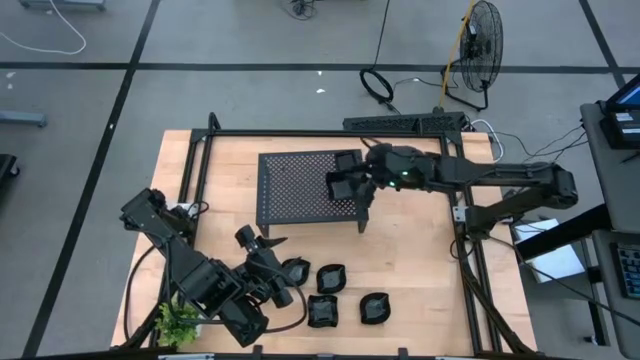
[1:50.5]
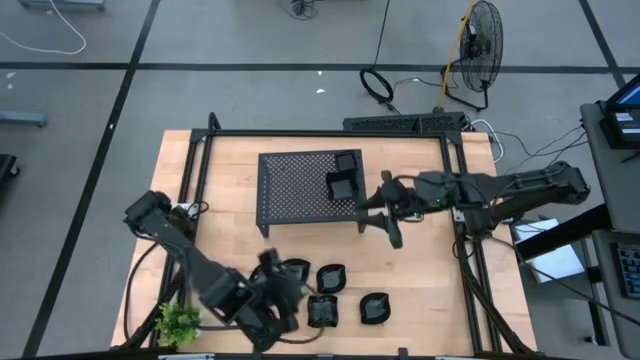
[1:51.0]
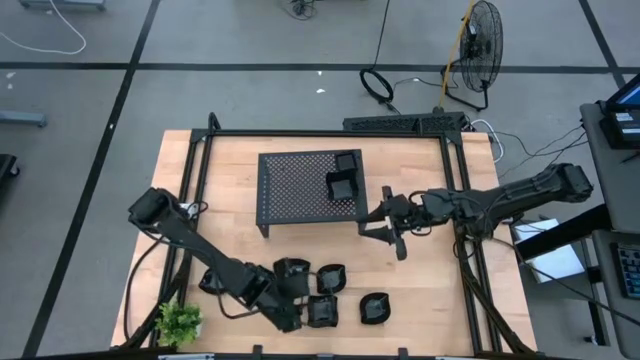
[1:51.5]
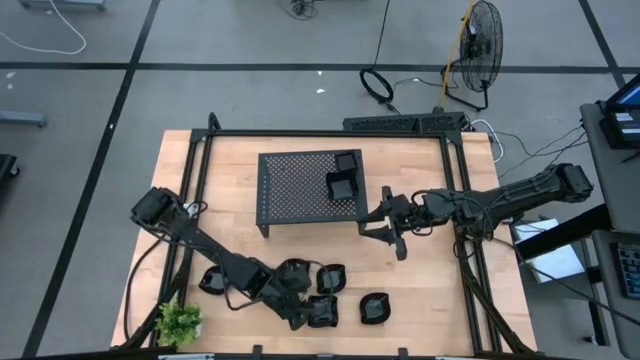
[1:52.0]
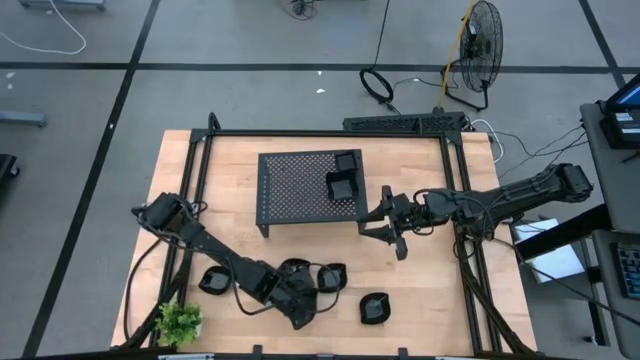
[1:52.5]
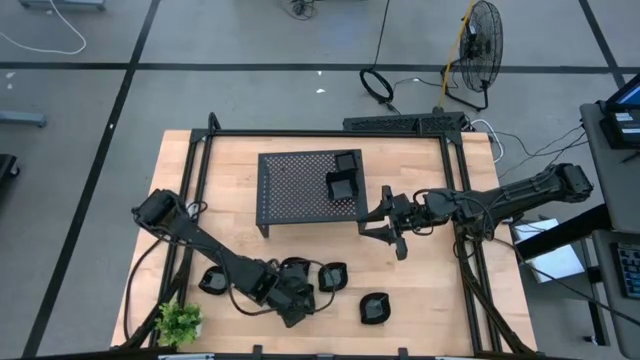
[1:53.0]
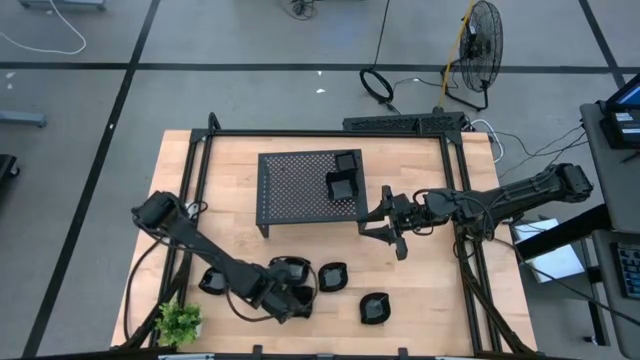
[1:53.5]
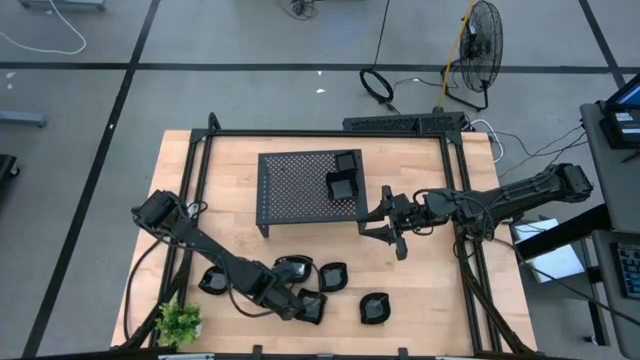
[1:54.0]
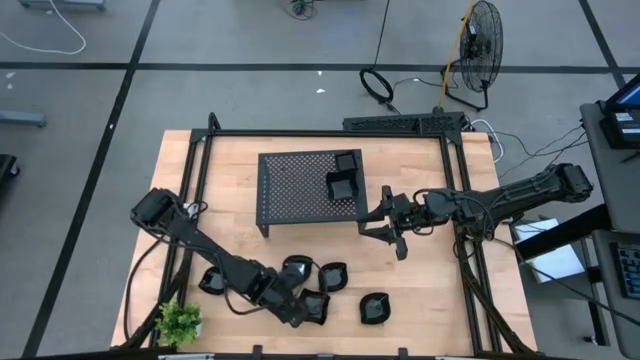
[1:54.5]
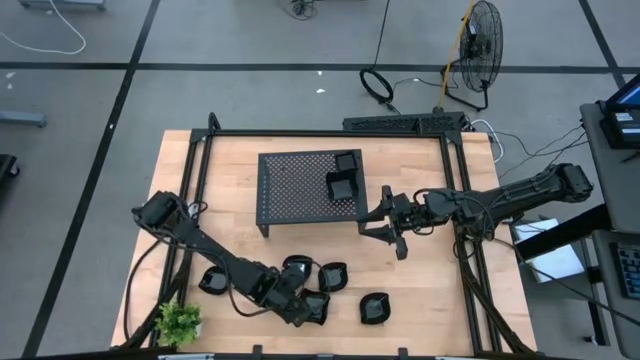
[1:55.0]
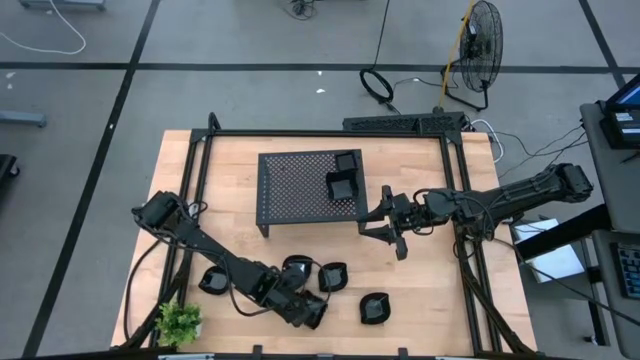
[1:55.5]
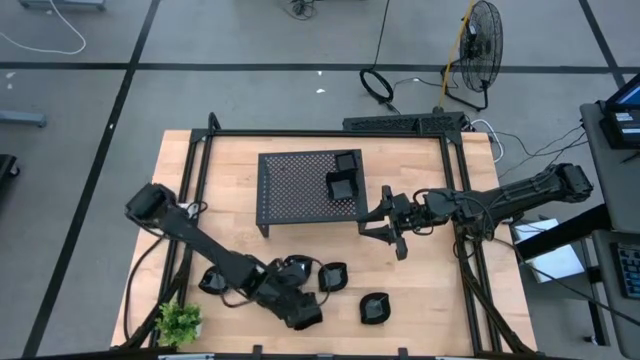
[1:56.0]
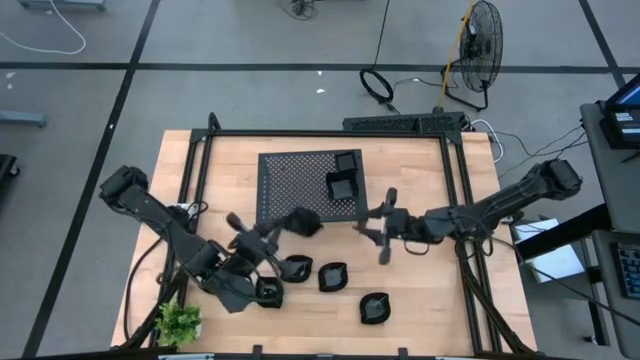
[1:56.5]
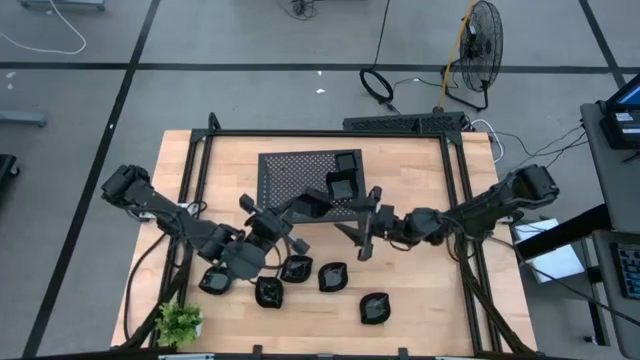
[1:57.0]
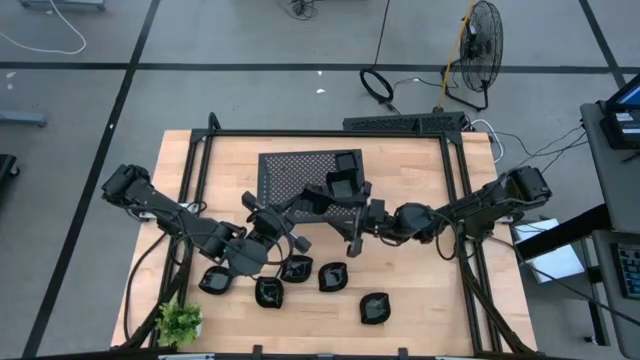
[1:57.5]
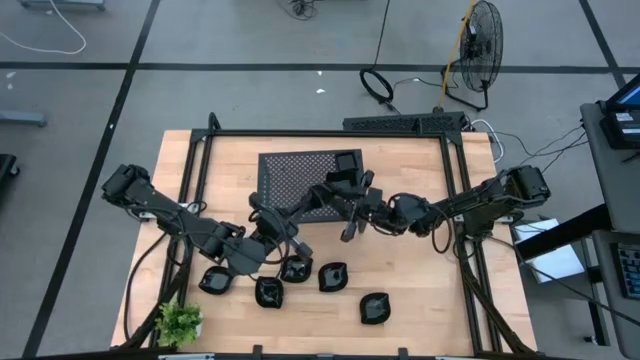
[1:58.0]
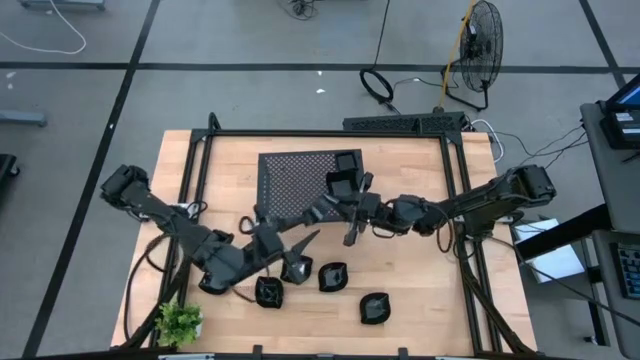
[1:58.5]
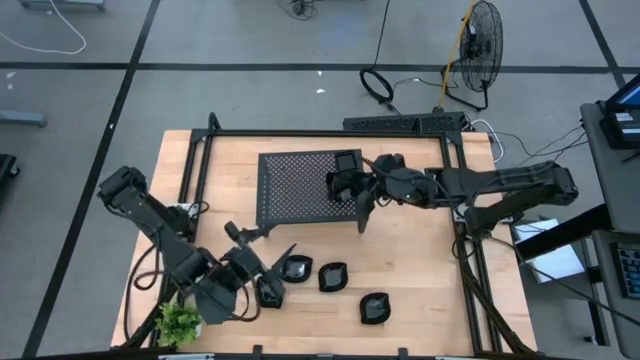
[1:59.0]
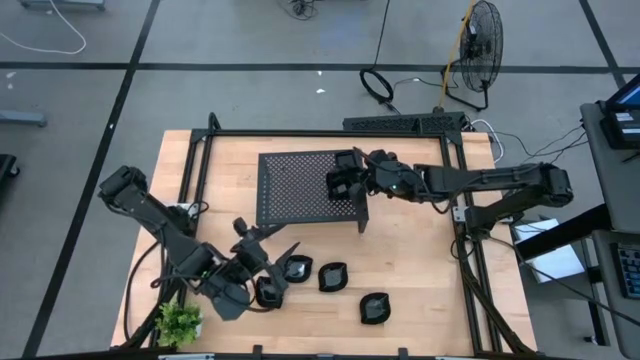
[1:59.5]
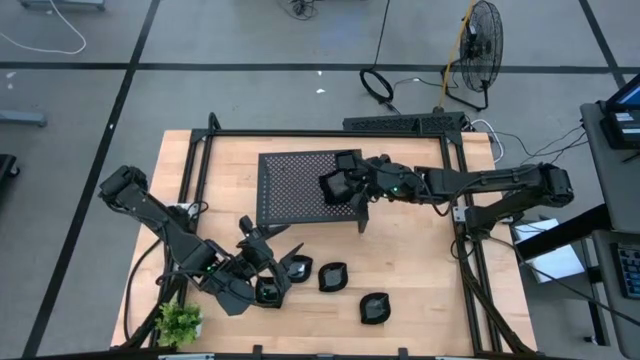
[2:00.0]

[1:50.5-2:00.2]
Task: Pick & Place Mini shaped plates
Stack the distorted square plate onto the stacked distorted square plate on the shelf

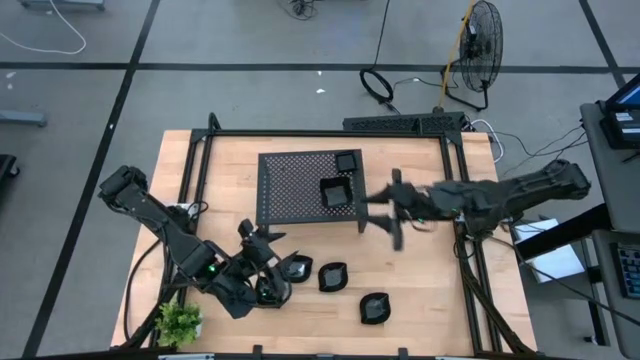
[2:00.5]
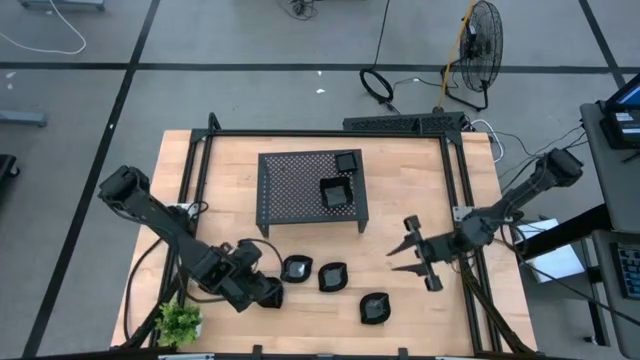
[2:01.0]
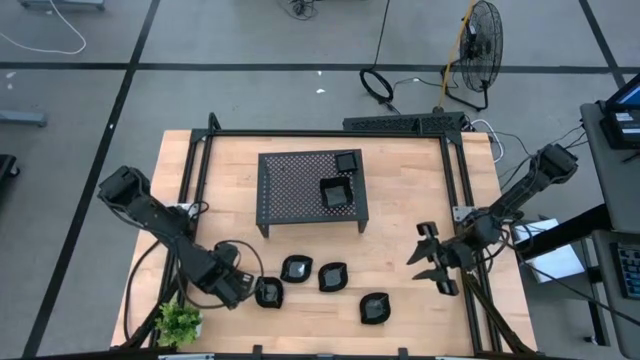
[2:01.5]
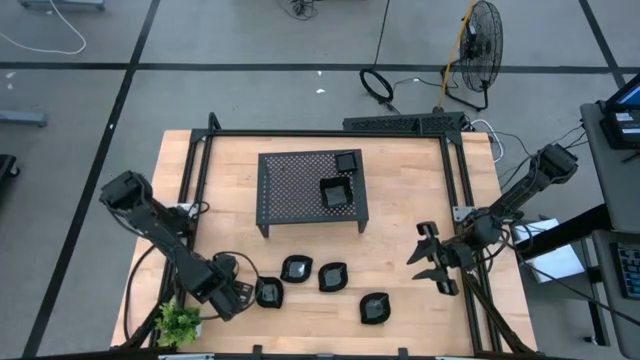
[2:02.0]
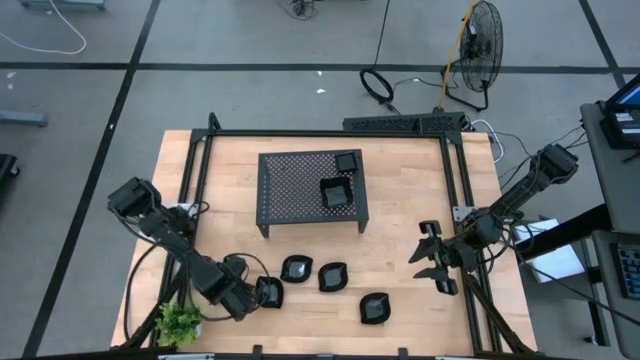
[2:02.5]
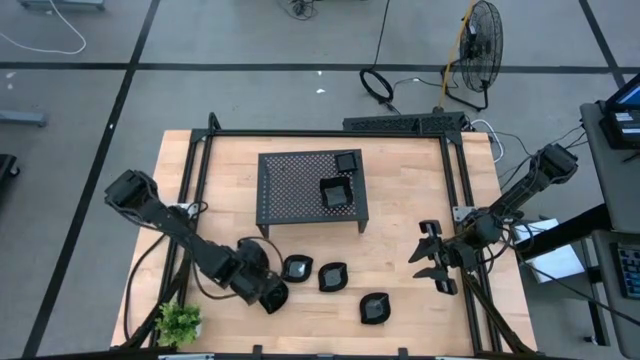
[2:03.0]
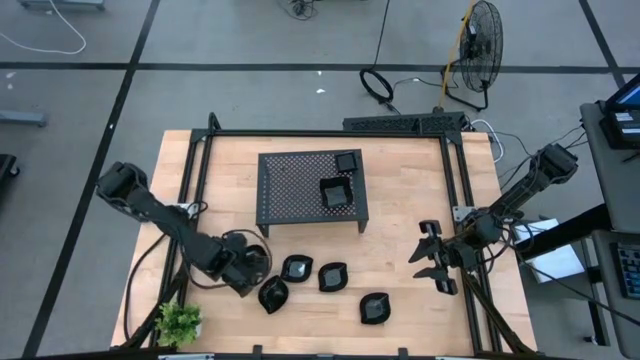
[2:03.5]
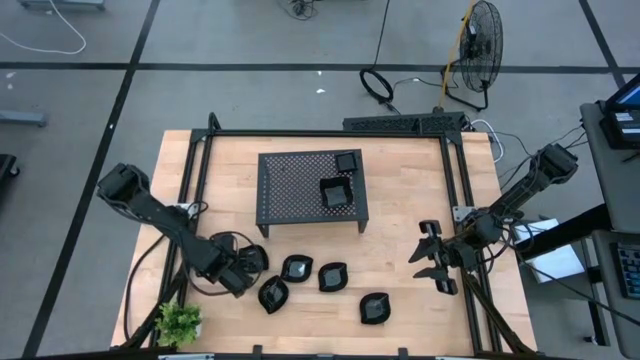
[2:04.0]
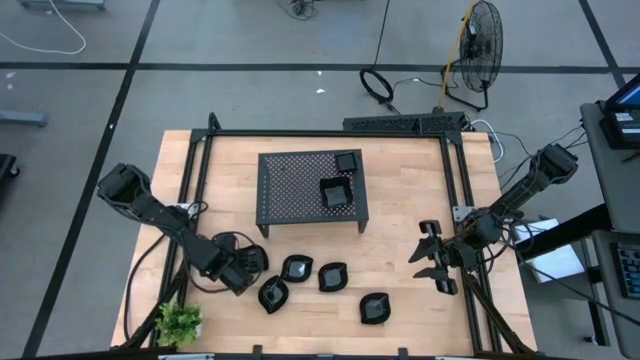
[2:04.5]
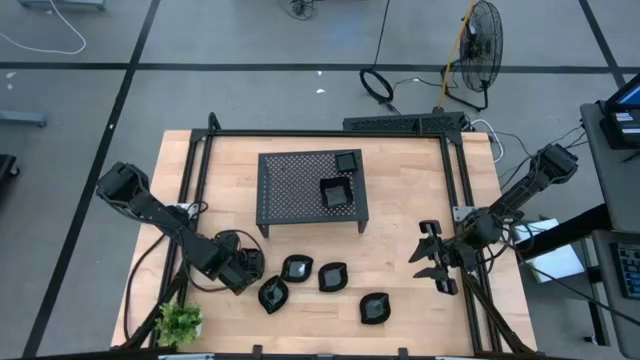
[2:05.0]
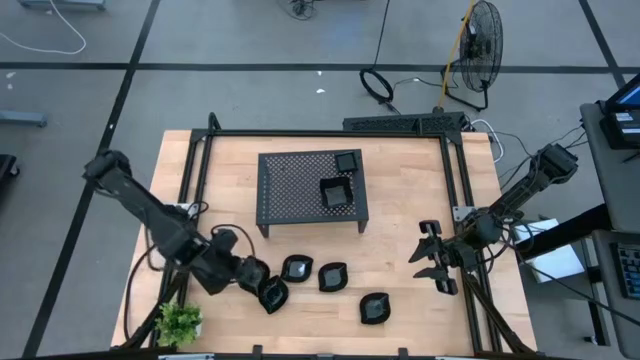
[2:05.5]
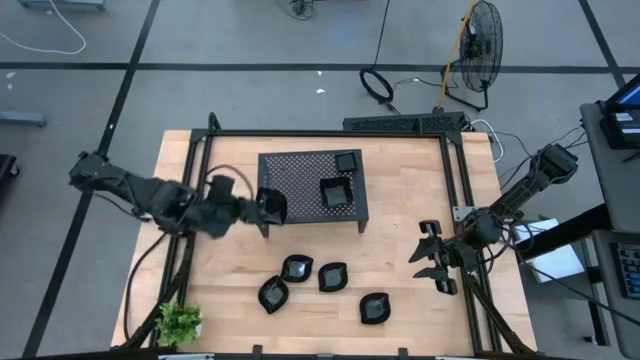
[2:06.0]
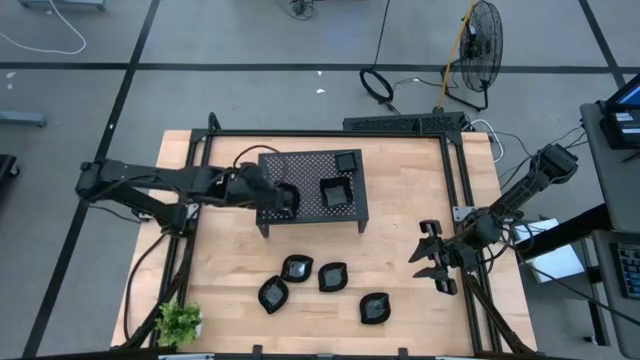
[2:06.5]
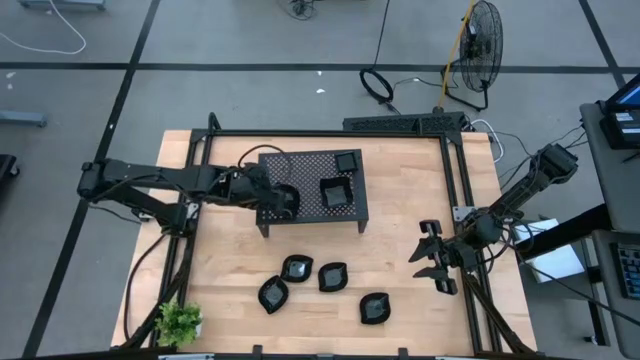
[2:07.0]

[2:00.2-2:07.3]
Put the leaf-shaped plate on the shelf

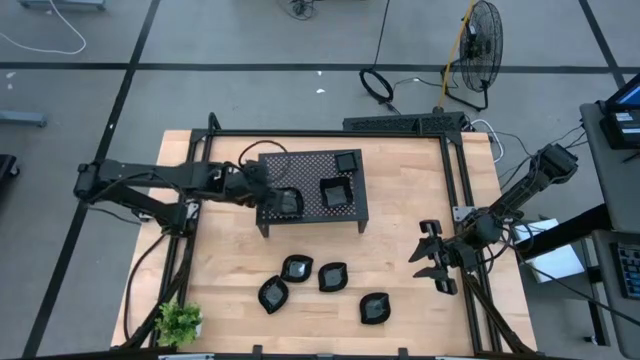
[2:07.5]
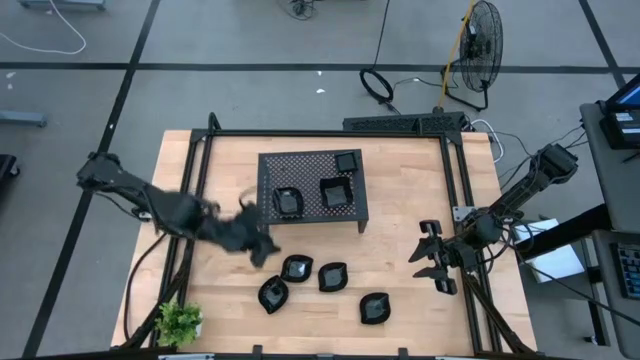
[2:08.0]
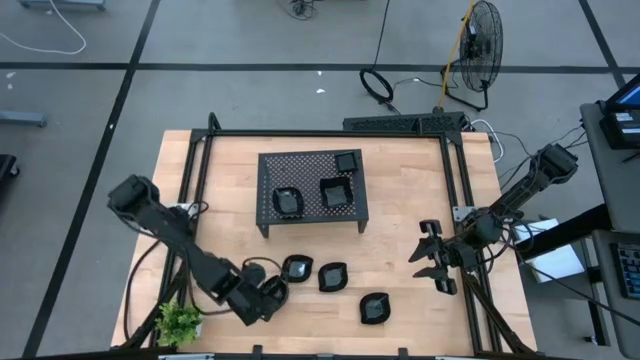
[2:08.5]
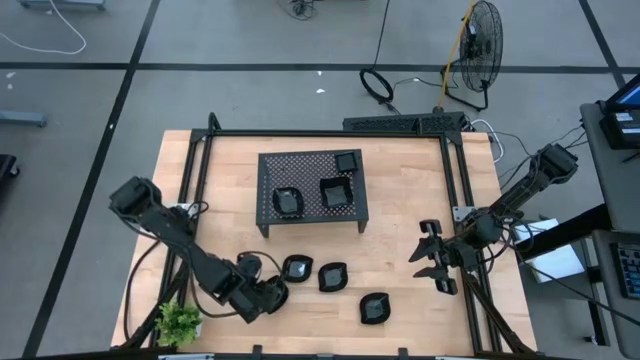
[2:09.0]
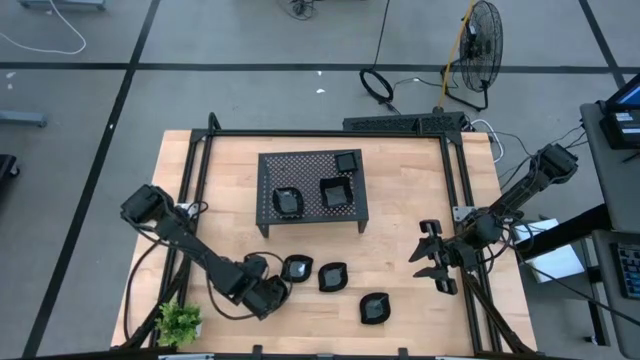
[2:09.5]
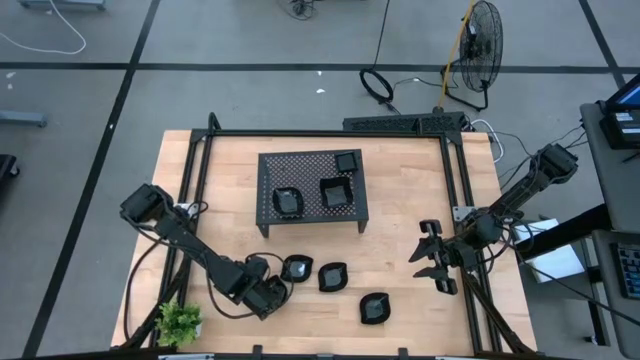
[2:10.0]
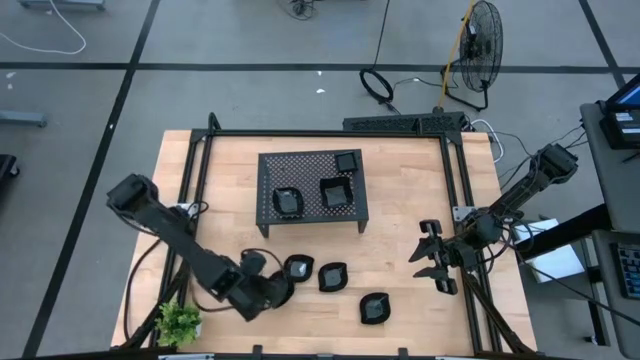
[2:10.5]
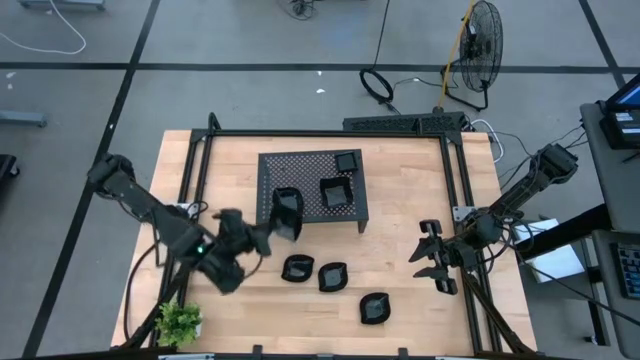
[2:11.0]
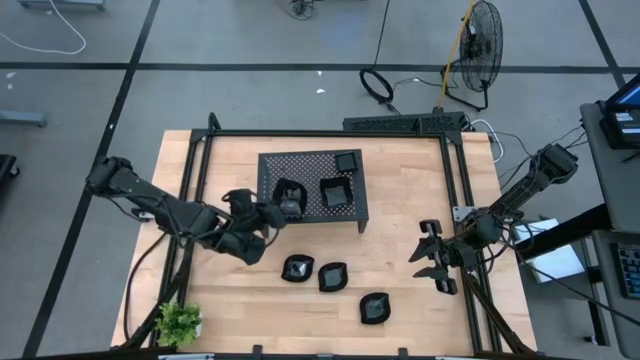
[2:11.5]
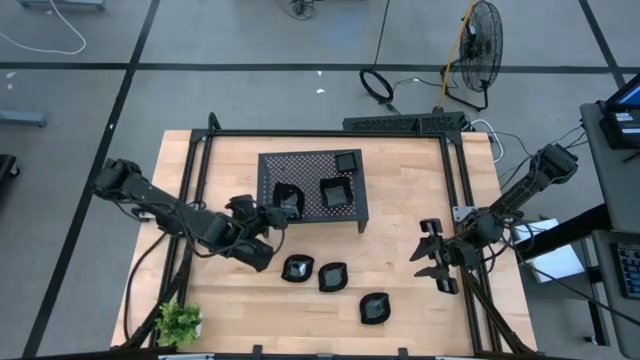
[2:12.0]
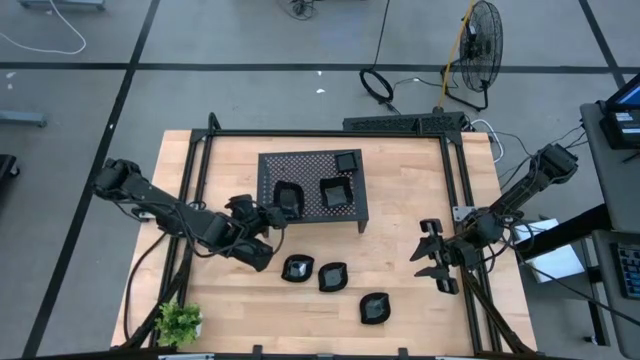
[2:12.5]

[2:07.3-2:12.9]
Stack the leaf-shaped plate onto the other leaf-shaped plate on the shelf
